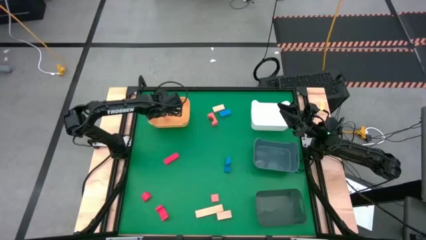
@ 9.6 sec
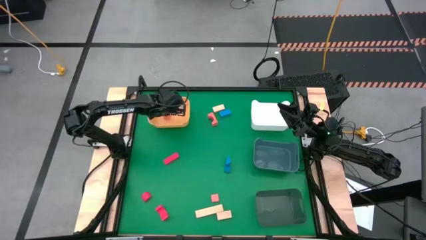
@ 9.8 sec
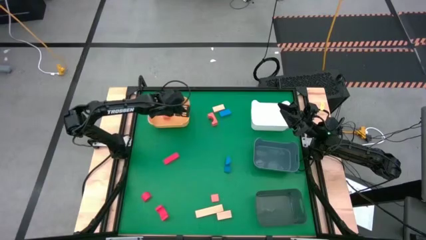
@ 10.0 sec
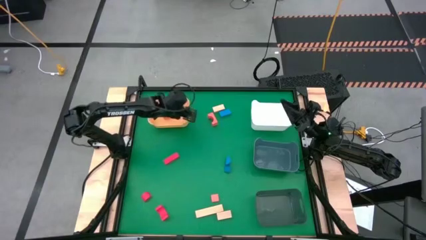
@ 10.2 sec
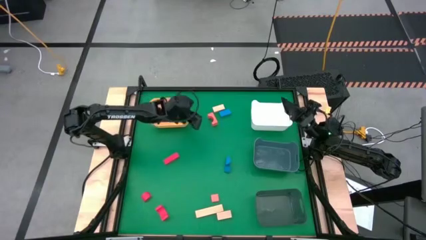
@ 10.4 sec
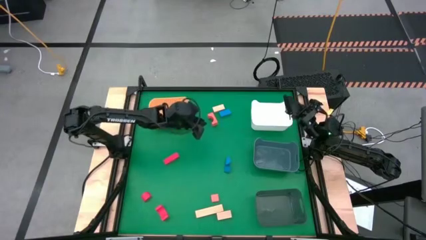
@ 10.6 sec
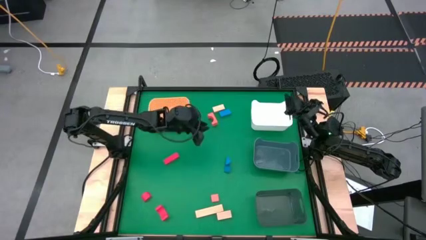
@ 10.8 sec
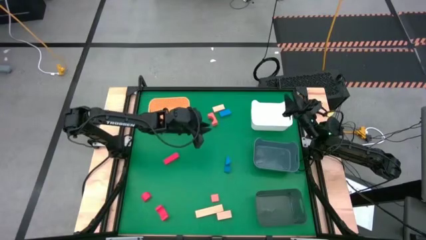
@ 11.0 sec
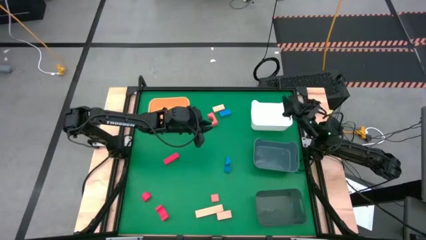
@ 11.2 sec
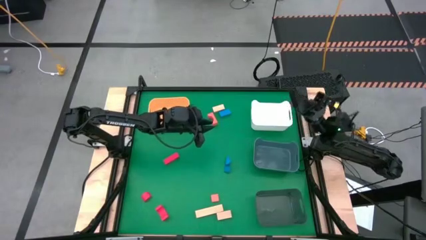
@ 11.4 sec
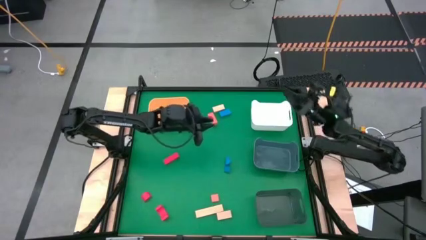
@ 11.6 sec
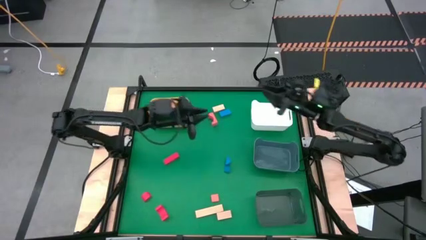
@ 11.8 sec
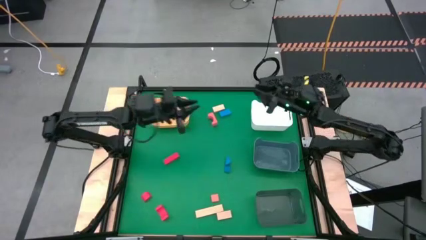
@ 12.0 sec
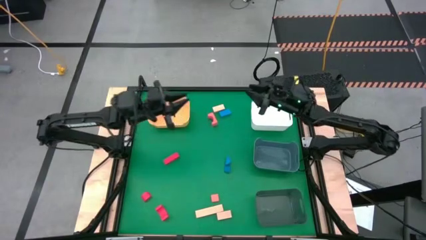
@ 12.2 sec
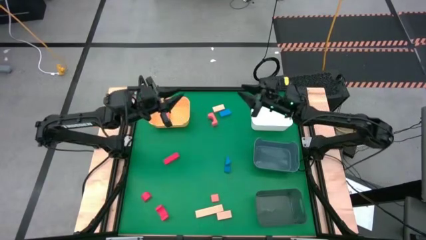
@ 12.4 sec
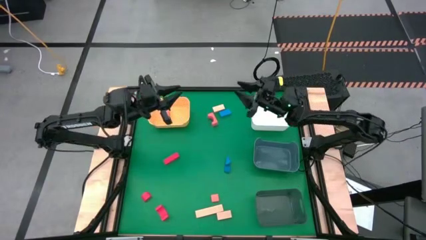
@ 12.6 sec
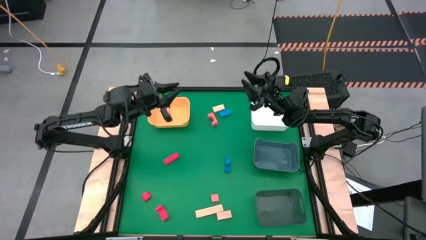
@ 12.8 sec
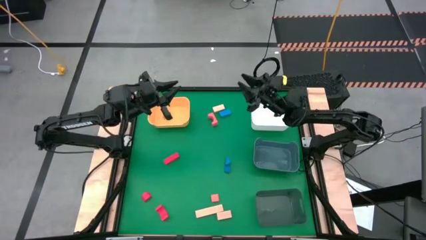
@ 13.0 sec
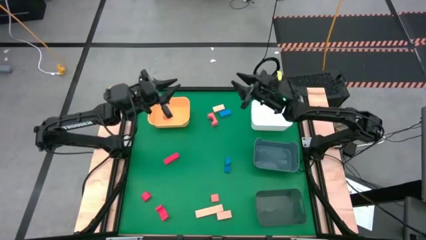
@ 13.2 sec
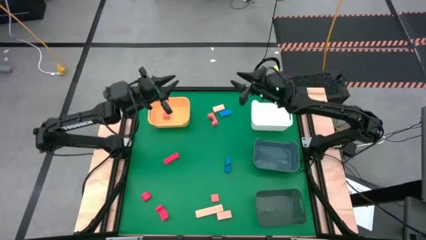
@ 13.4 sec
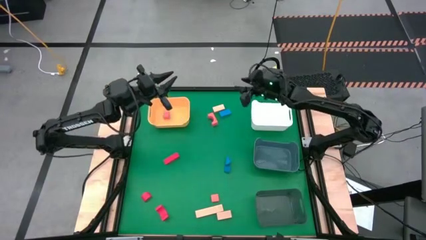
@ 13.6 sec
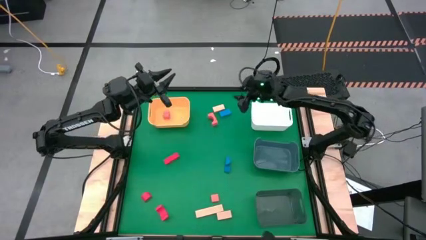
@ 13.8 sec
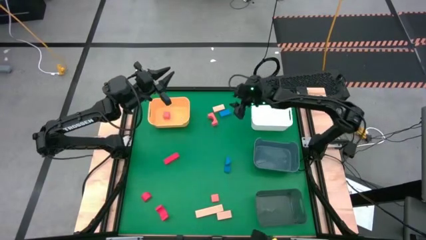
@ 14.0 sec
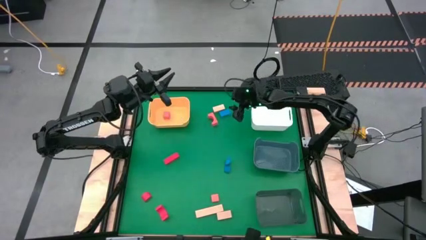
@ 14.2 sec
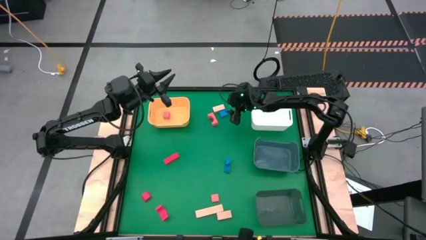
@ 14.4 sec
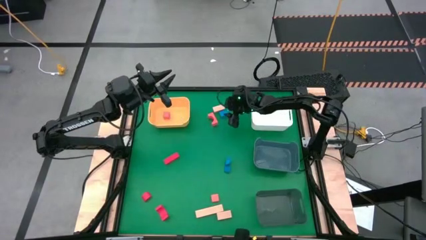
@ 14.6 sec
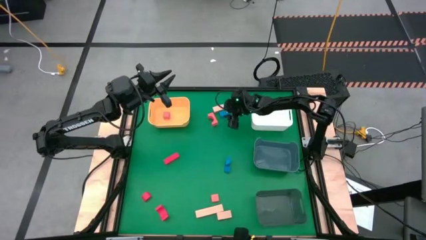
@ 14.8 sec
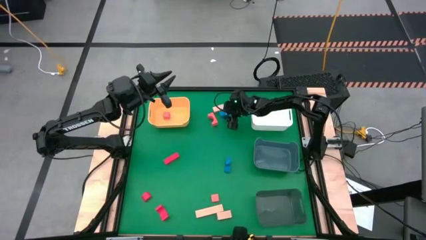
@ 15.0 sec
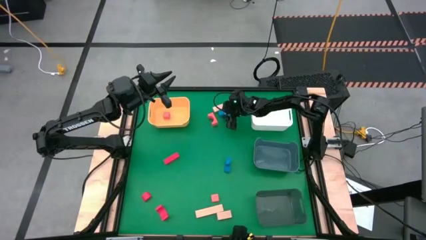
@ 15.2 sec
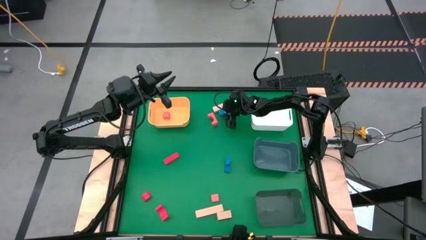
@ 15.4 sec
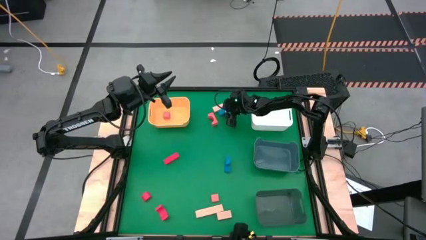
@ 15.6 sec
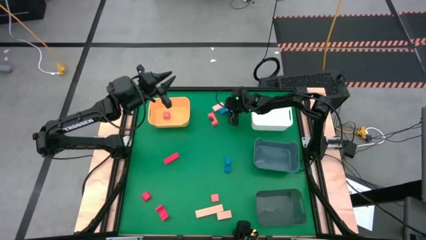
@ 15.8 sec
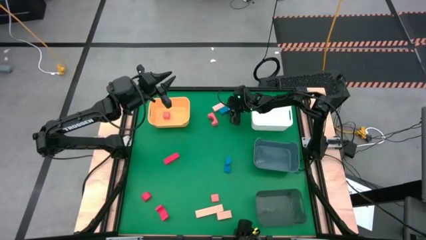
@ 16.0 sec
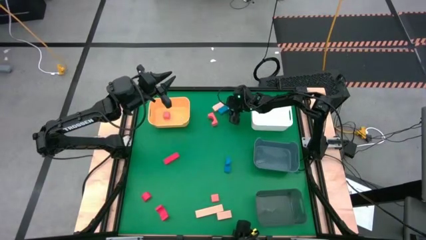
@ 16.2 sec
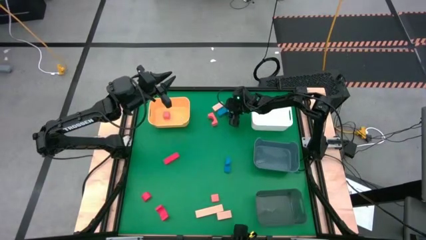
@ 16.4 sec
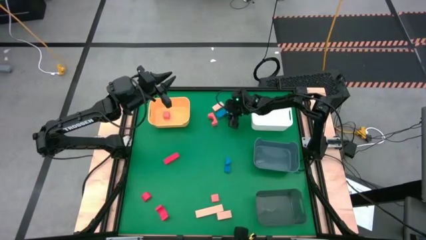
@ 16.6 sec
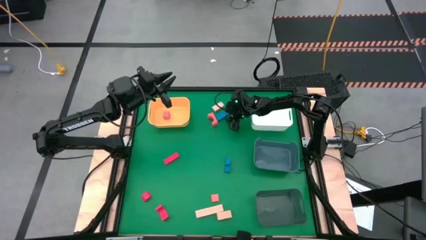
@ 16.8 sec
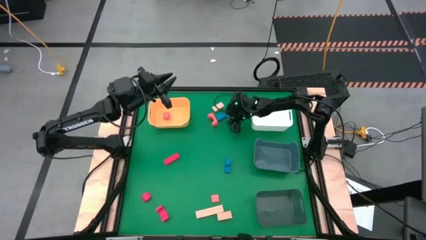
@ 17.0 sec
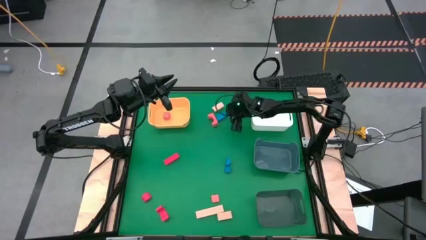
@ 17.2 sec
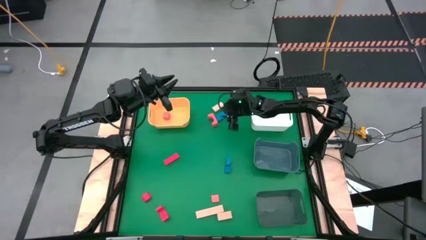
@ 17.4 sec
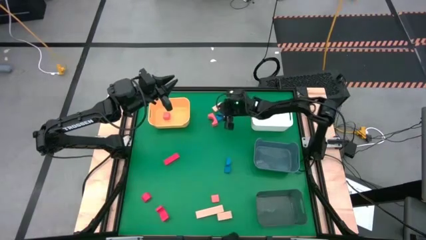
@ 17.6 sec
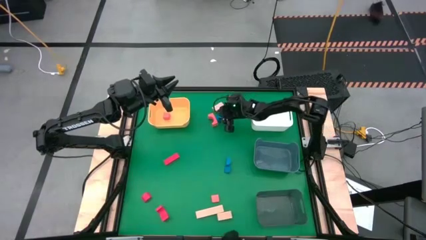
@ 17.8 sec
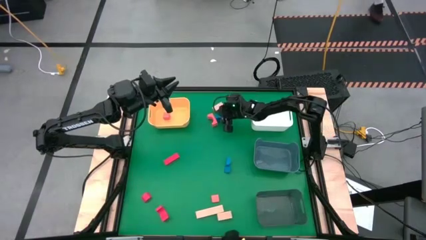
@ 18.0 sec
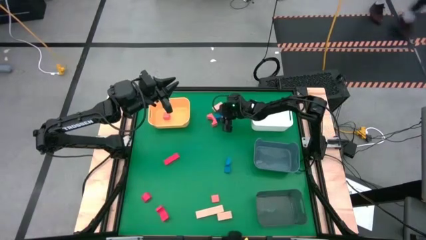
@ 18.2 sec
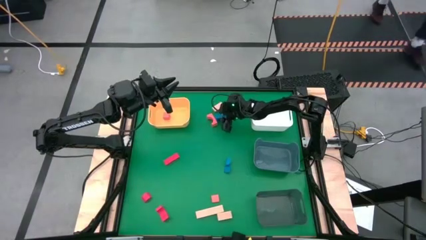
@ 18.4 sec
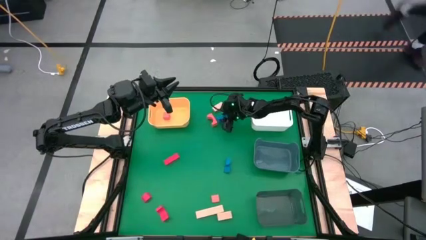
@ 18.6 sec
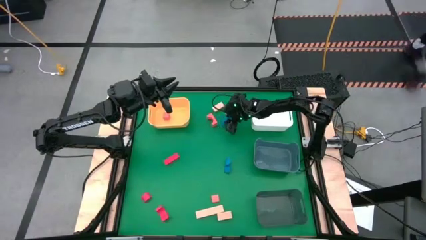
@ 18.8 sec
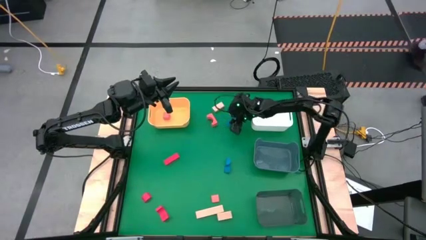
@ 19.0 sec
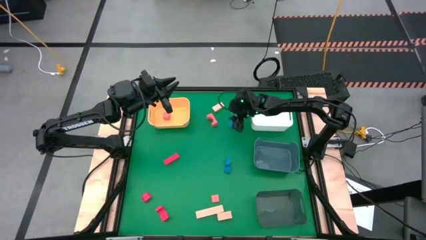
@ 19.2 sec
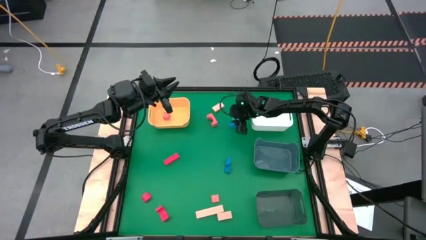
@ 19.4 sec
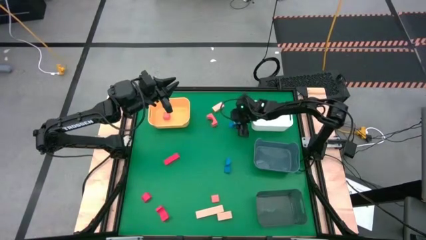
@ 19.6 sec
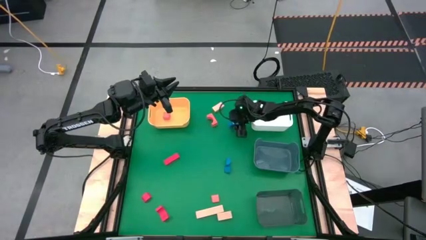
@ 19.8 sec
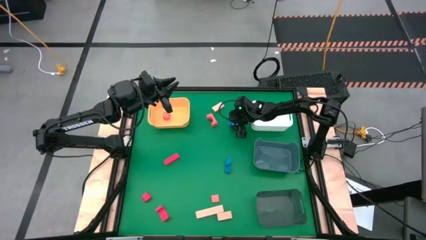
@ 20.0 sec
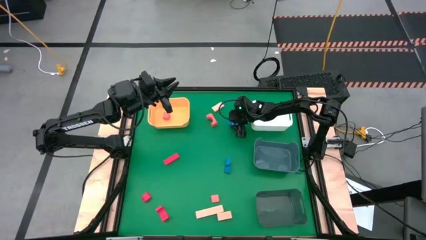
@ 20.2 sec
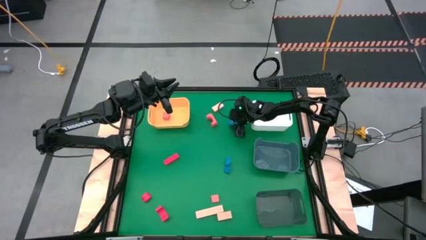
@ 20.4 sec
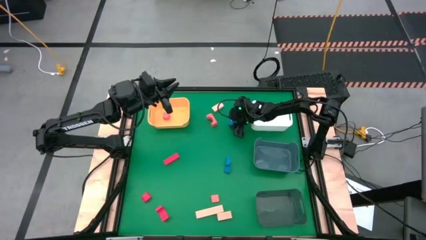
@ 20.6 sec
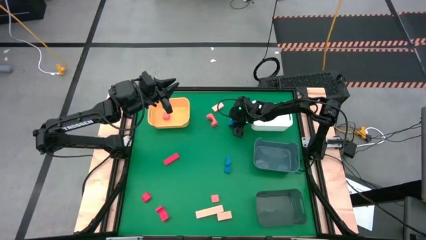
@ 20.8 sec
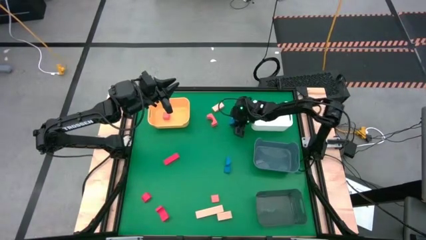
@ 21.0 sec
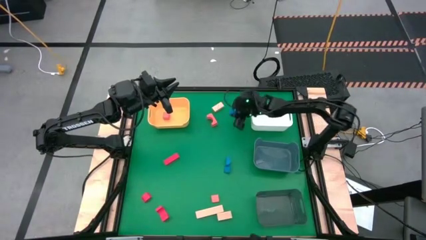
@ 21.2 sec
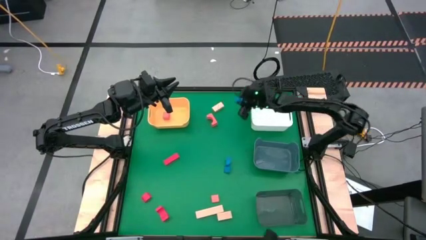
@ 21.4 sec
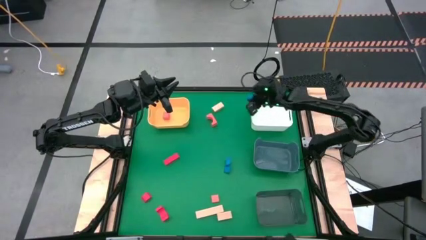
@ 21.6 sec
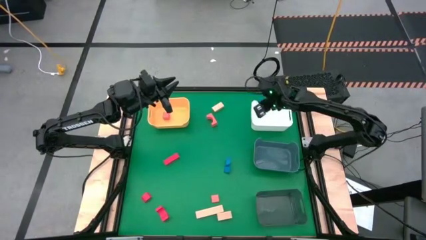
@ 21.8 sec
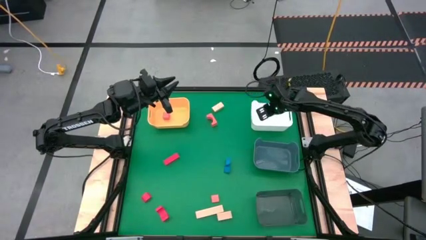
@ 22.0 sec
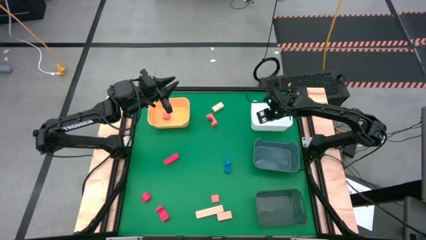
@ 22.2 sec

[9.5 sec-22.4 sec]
Task: Sort & place blocks by color
Put the top blue block into the white bin
